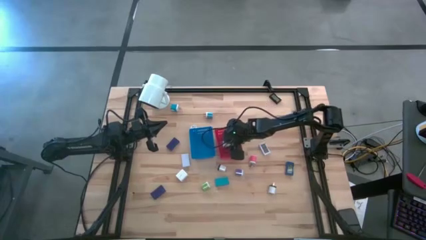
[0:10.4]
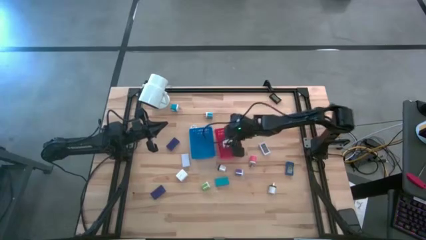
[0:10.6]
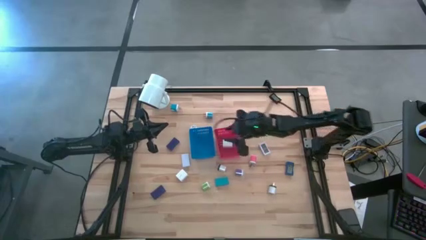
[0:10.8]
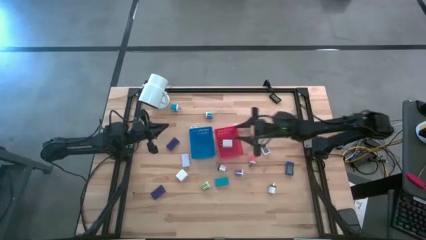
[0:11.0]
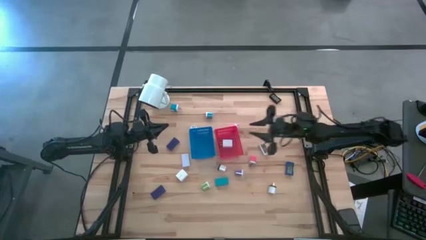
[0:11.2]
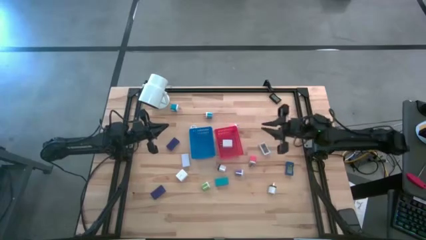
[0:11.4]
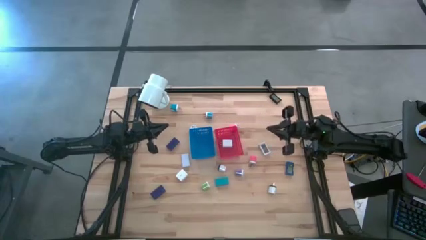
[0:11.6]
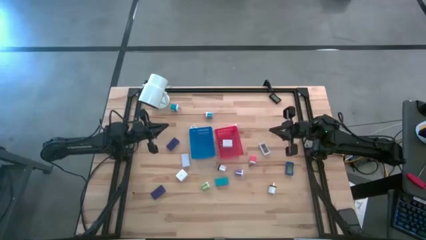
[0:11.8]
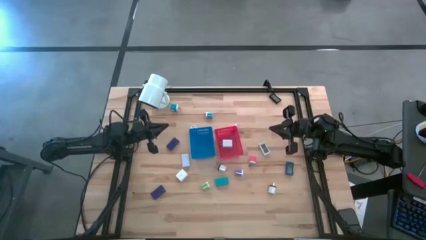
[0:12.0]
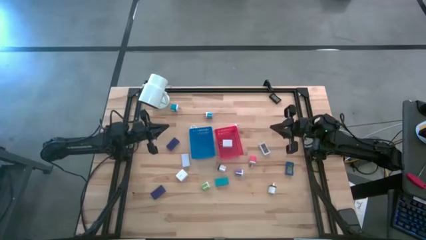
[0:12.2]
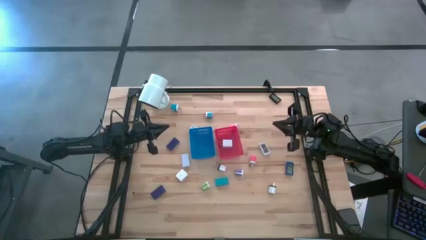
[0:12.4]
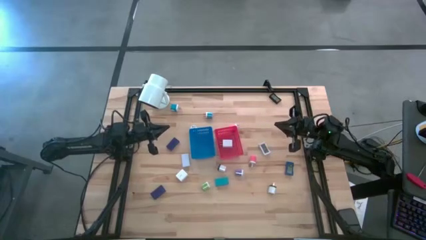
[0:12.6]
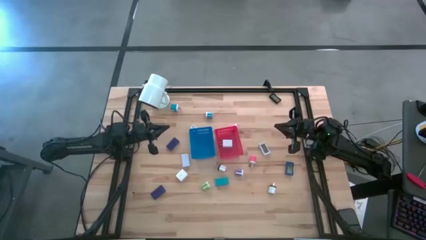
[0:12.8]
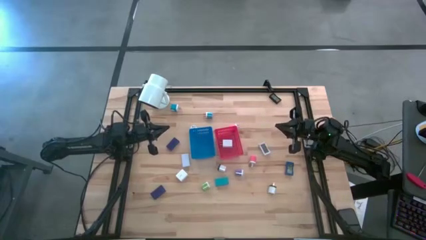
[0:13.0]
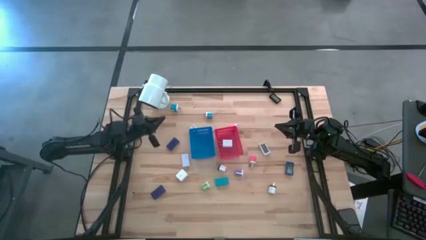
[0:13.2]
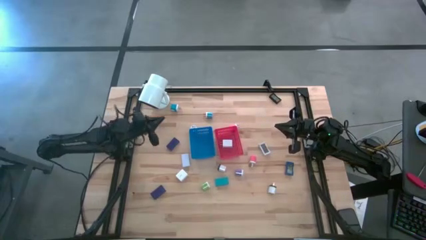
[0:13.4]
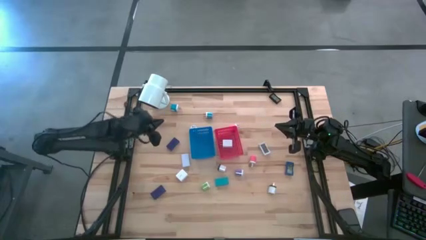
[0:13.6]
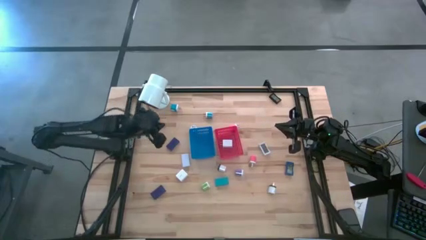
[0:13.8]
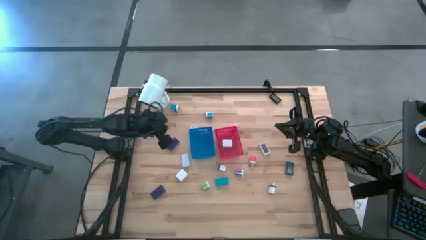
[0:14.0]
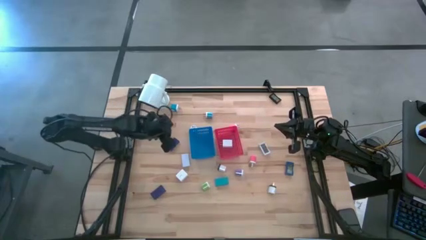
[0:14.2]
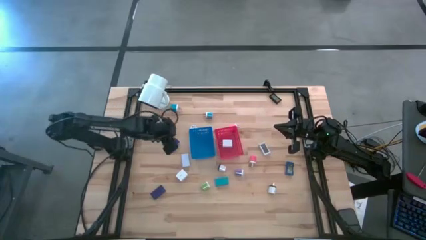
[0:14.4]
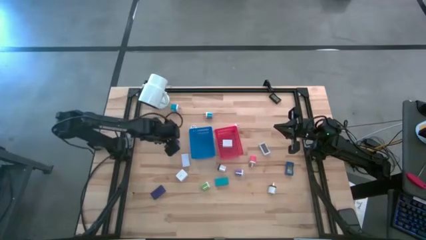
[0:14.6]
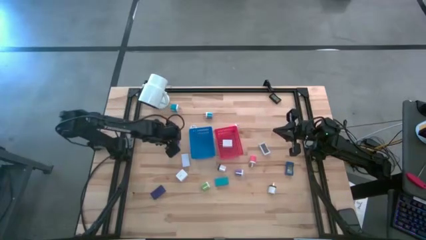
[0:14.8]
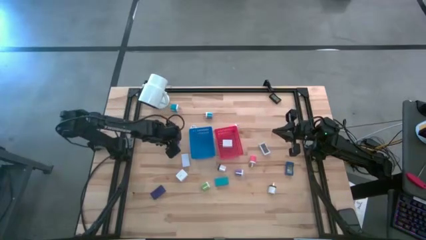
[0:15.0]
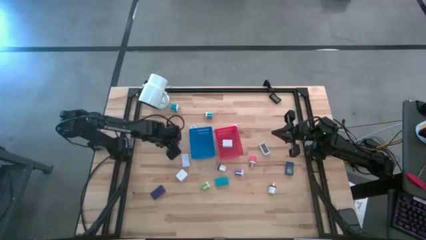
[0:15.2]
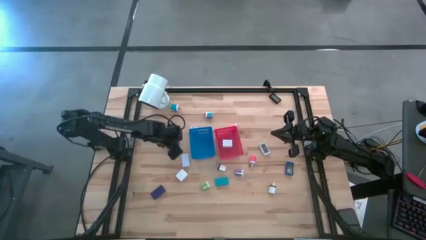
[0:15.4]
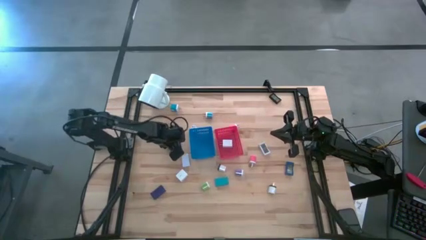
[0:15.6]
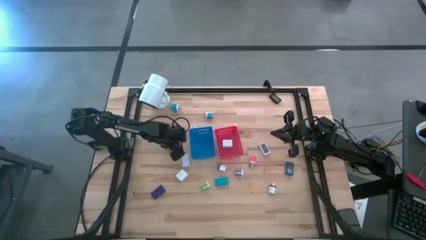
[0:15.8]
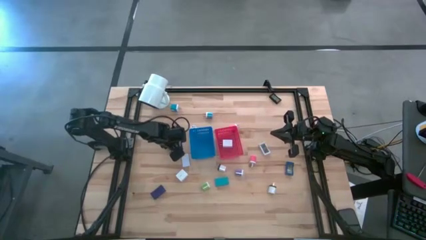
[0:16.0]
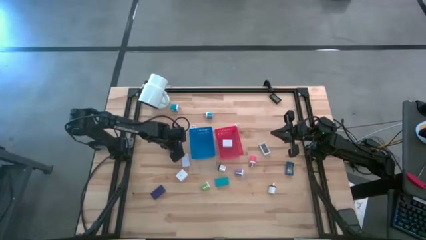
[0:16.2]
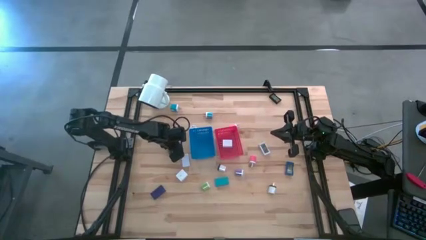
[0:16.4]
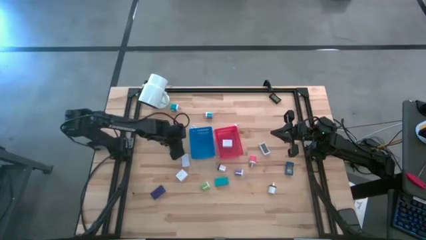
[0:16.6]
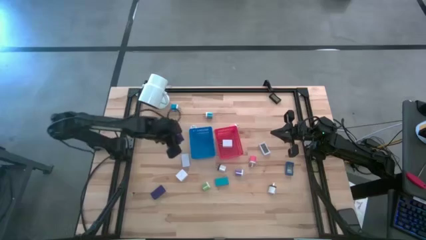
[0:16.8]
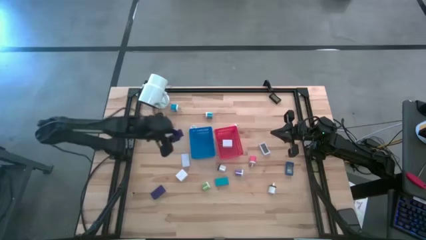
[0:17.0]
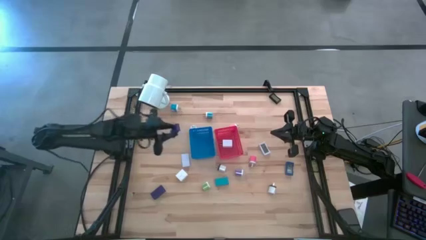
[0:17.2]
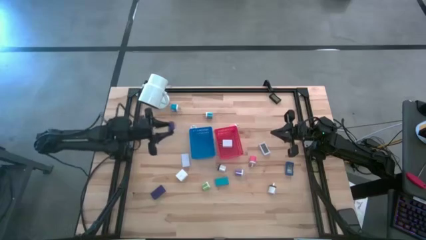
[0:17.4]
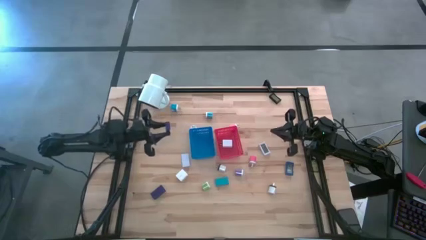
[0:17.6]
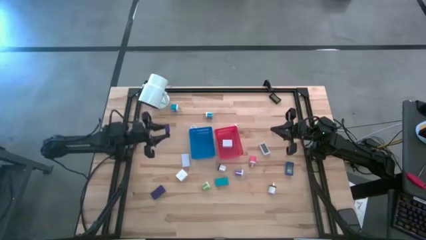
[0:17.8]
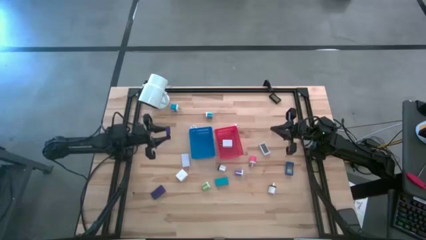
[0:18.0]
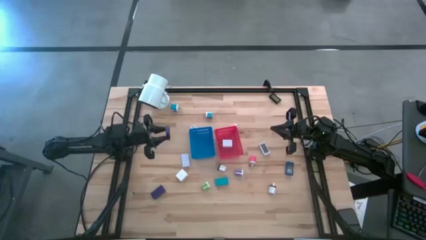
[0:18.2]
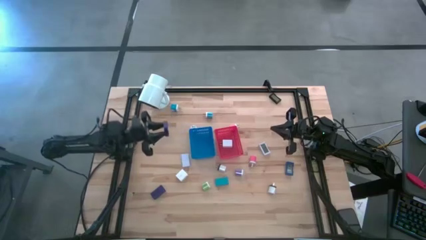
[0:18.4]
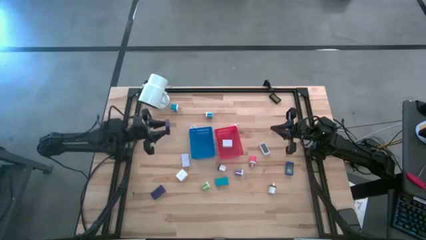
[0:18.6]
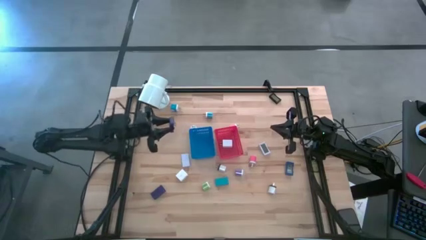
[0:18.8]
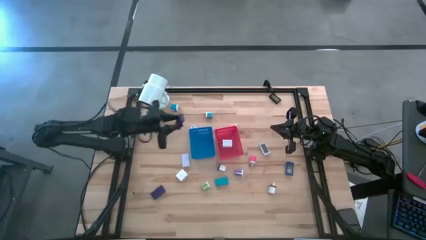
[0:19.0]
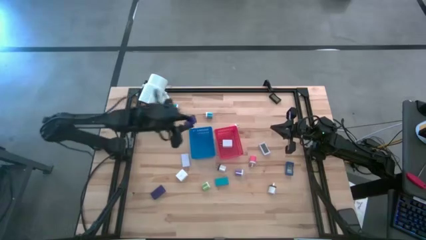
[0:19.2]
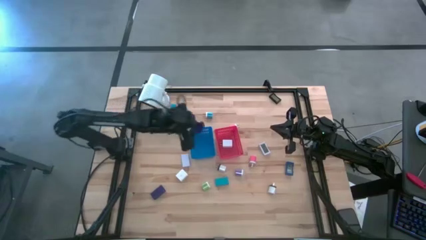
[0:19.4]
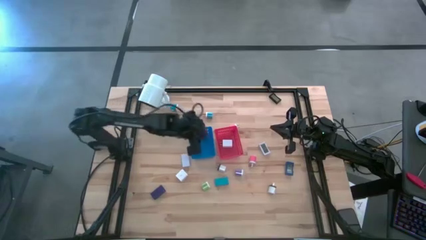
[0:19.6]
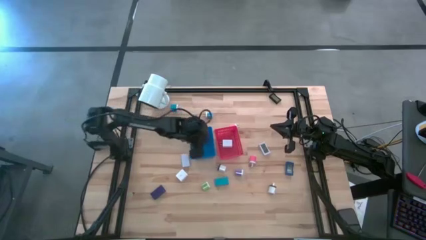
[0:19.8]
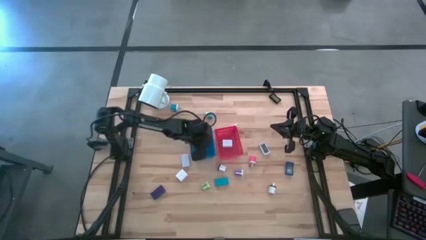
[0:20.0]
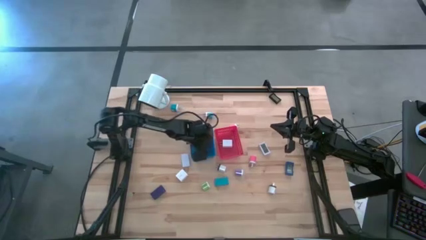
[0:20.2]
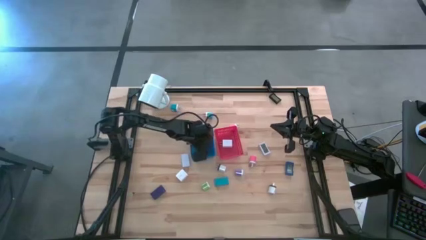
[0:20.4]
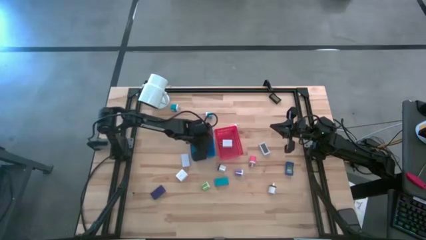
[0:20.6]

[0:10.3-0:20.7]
Task: Pick & Place Office items
Put the top purple digital clock into the blue bin
